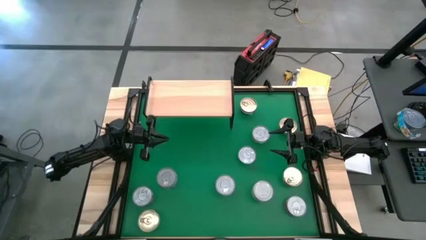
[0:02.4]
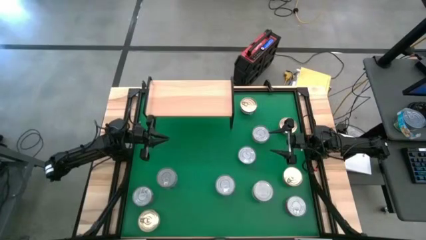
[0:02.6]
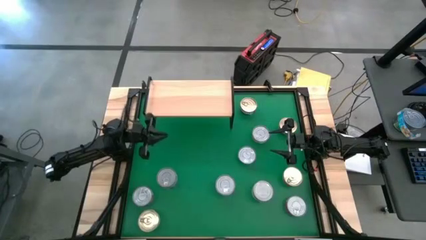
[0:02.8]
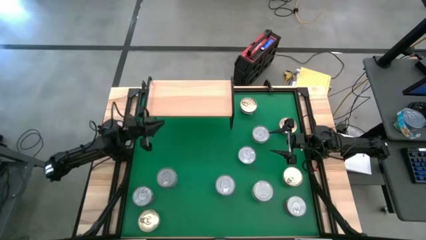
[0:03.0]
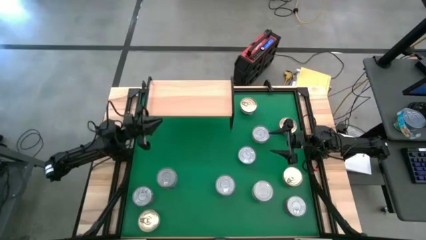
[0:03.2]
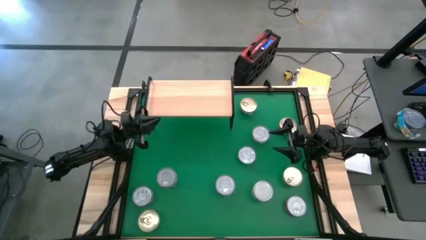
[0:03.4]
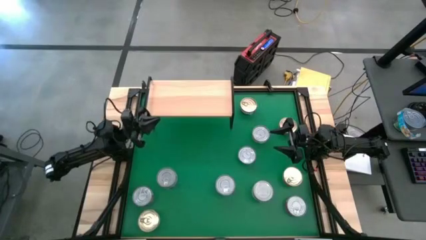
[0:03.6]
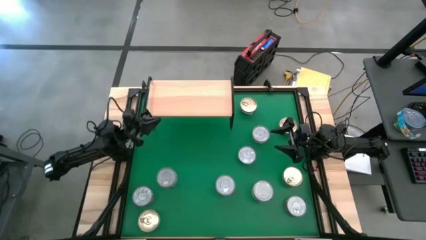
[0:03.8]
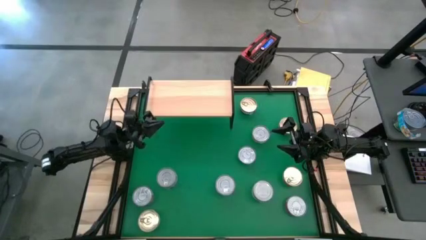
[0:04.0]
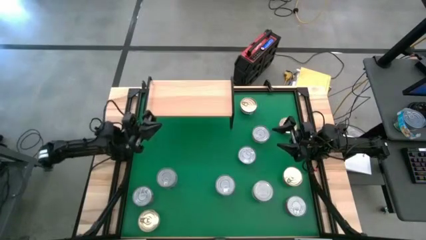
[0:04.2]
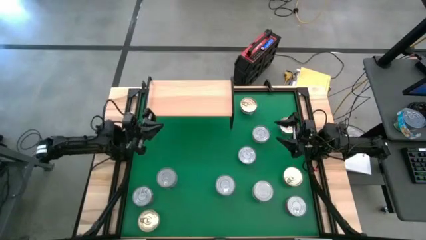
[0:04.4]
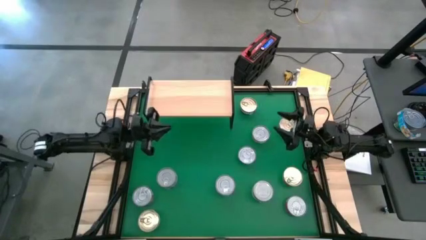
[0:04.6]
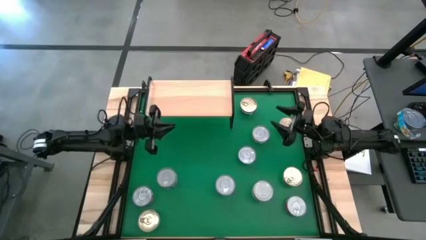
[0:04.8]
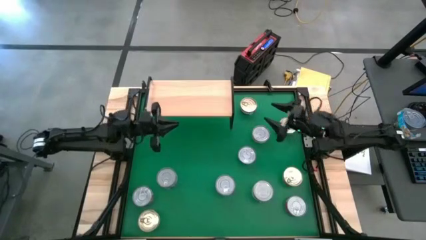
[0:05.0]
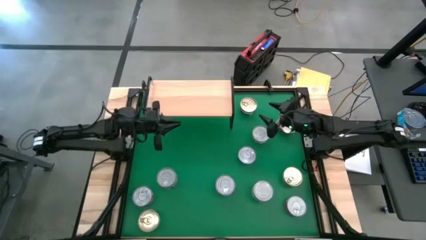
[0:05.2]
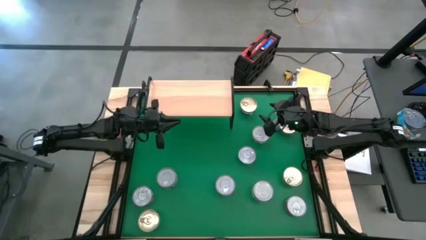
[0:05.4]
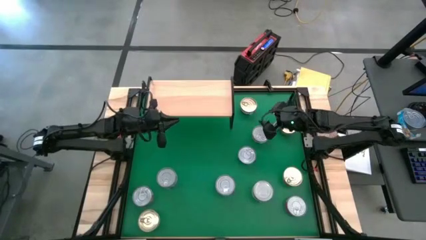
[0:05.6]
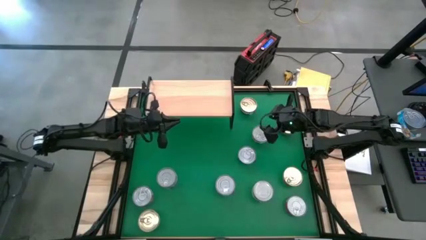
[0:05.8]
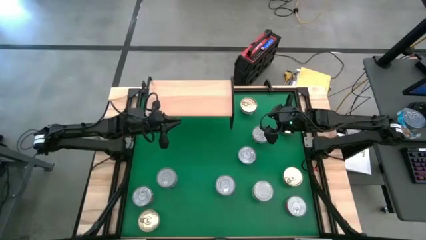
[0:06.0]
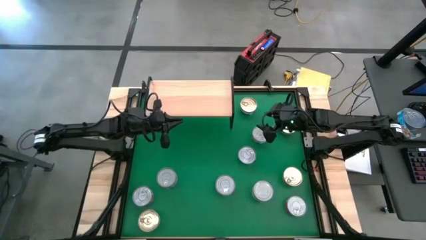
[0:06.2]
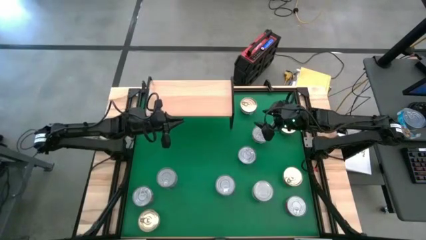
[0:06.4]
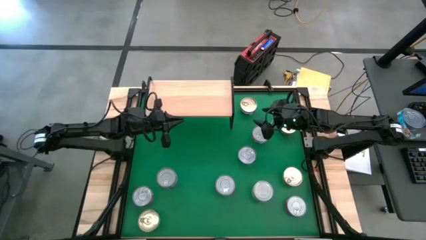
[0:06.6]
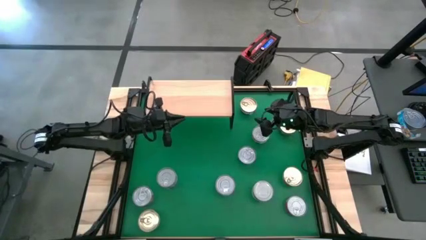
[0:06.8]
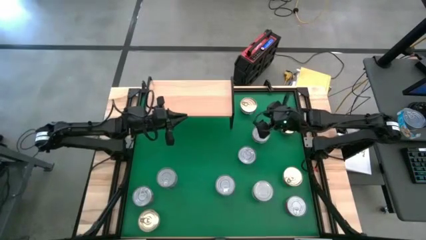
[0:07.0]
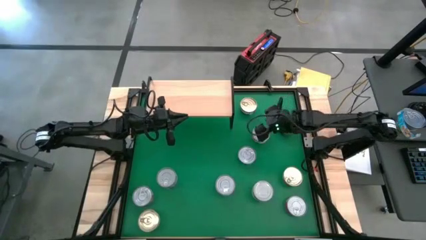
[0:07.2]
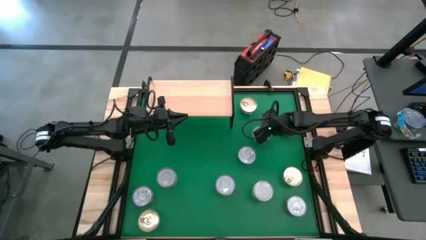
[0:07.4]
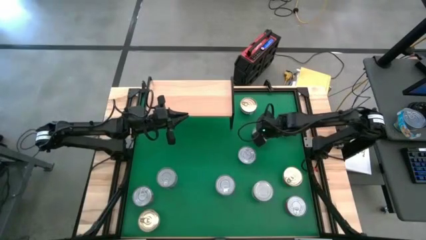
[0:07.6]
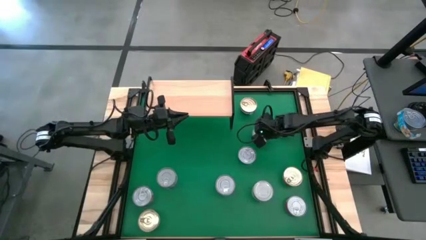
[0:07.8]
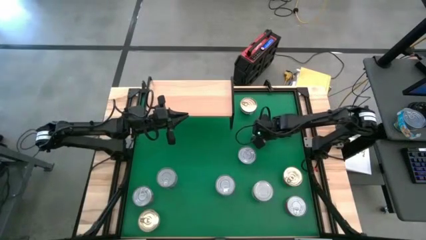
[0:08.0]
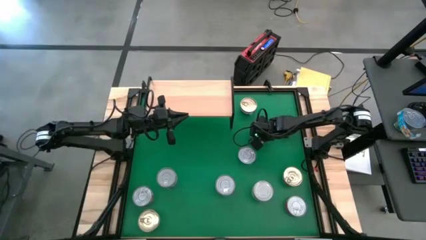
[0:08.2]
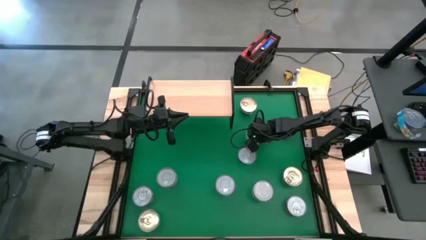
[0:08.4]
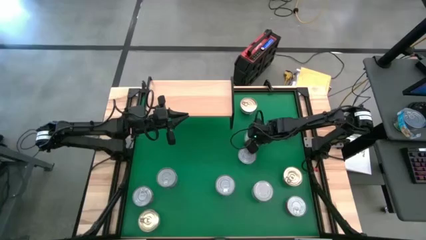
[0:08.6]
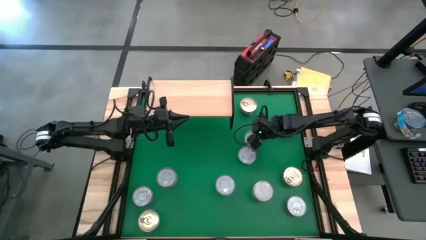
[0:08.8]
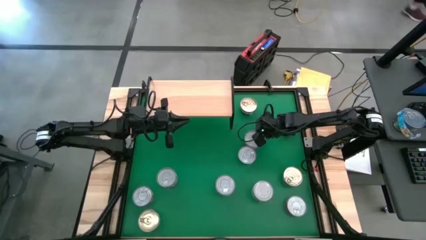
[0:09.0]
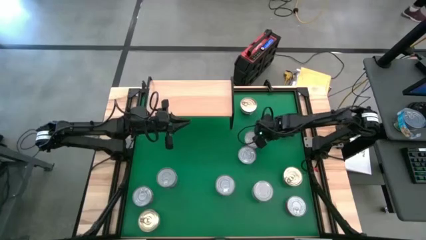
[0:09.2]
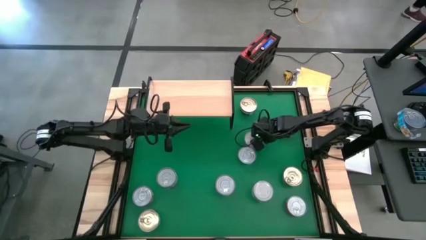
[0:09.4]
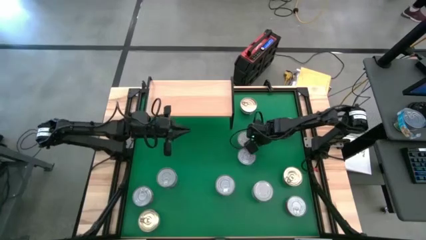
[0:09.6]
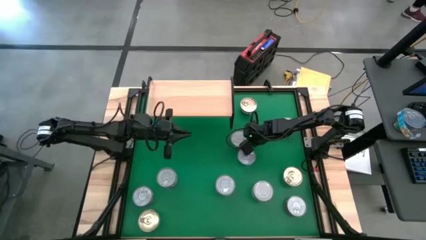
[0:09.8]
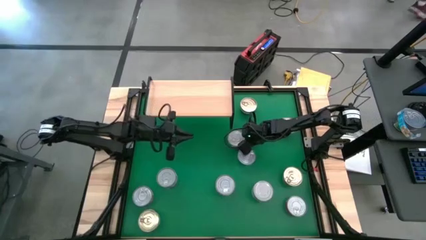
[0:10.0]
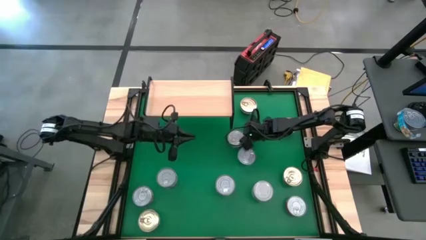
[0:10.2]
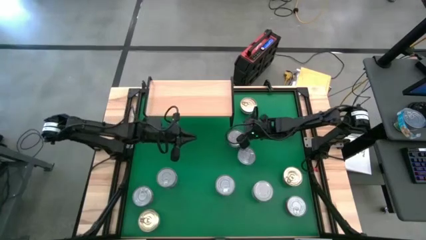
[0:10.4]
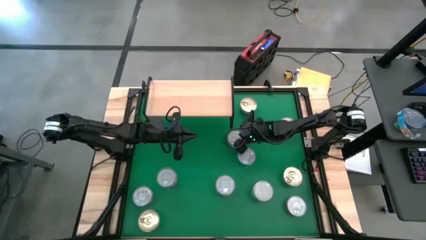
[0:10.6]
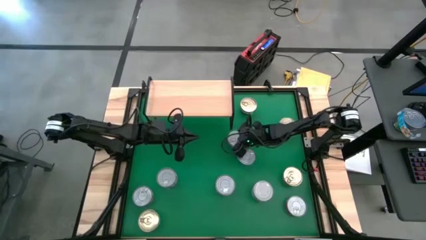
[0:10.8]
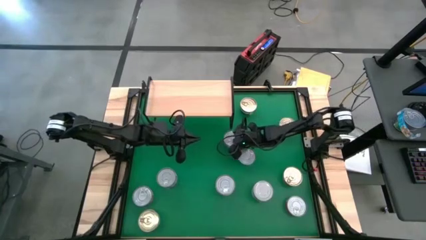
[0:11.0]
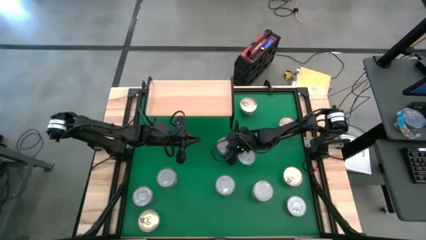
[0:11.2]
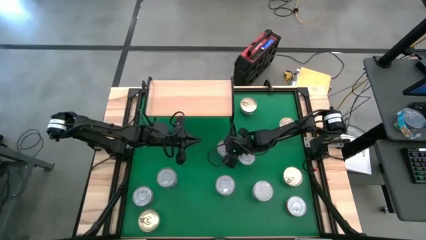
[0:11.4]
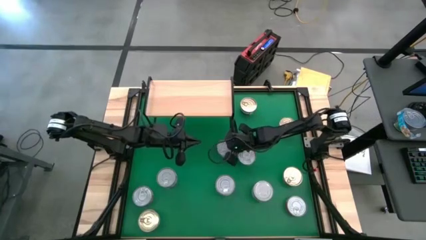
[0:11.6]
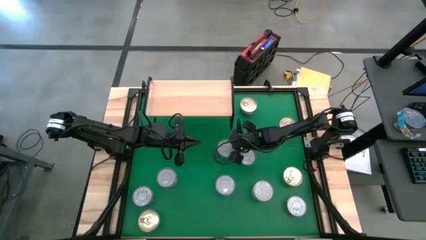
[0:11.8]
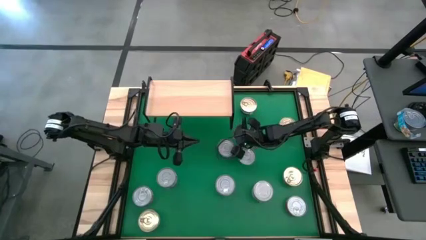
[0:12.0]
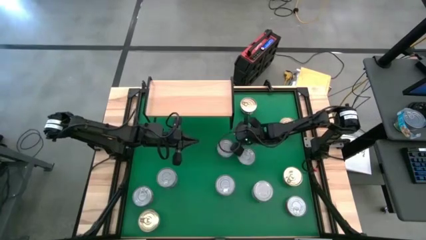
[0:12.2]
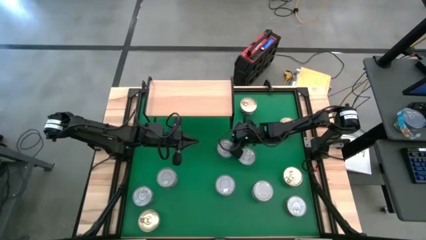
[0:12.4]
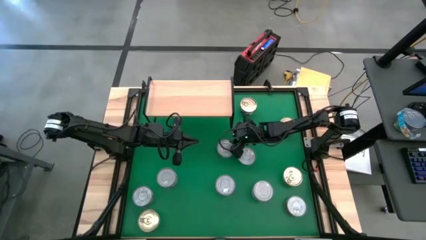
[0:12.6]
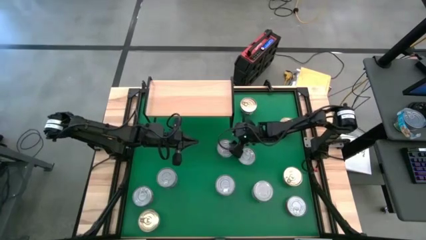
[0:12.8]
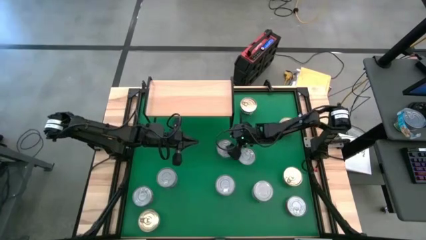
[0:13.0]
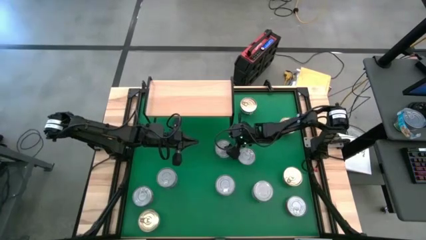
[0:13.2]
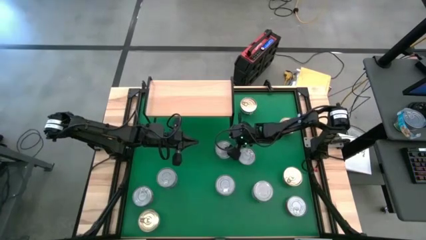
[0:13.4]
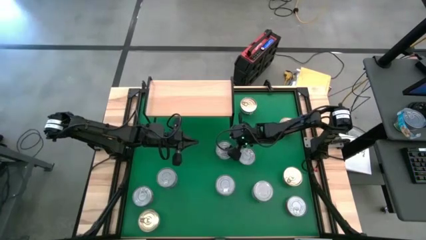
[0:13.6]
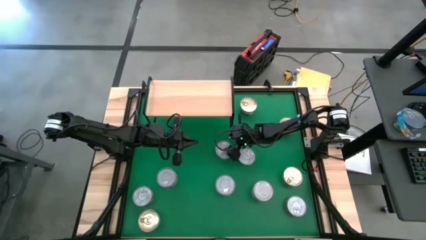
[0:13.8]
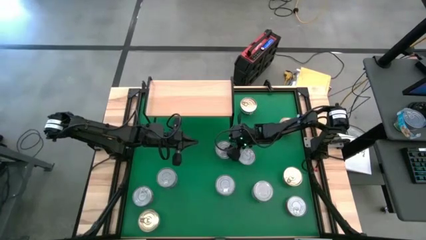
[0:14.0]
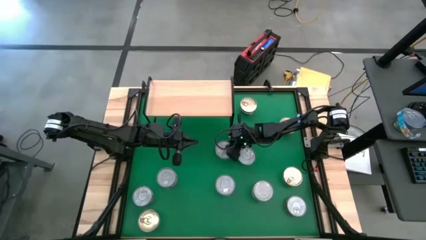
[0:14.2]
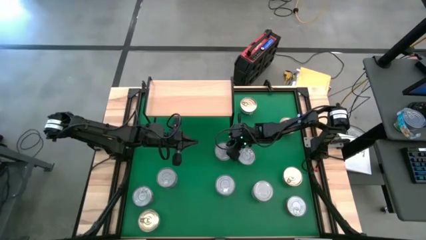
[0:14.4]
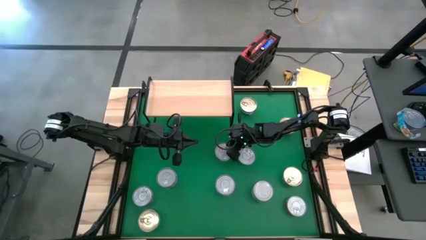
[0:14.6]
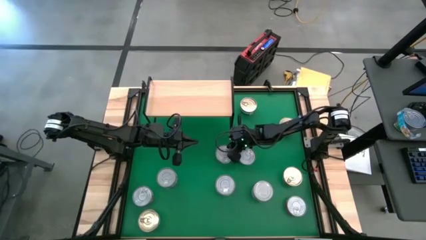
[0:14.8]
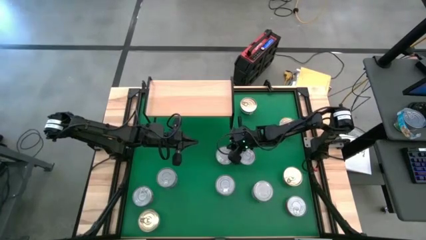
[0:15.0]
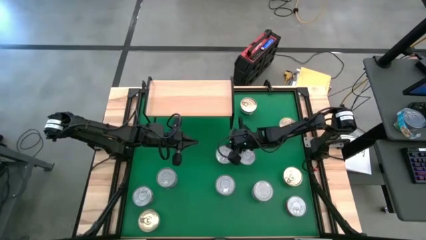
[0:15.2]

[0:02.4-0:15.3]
Task: Stack canned seafood by type on shelf
Put the top right blue tuna can on the shelf
